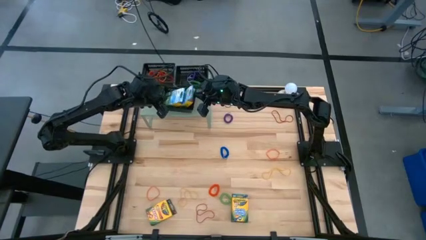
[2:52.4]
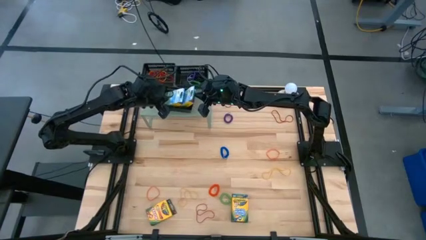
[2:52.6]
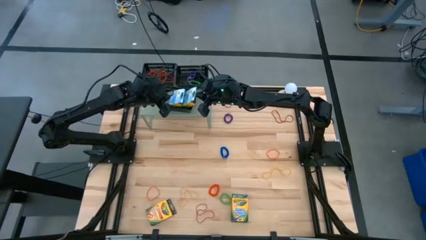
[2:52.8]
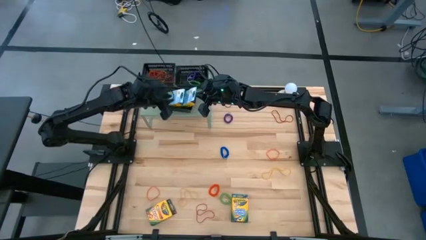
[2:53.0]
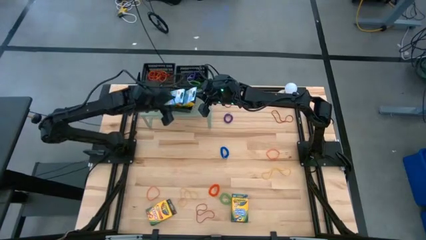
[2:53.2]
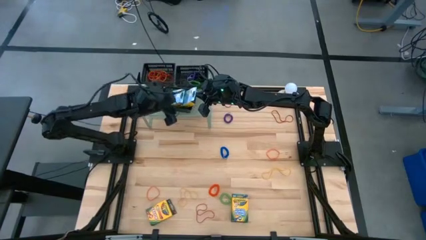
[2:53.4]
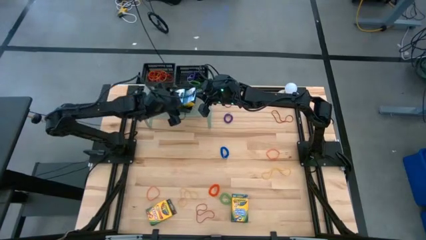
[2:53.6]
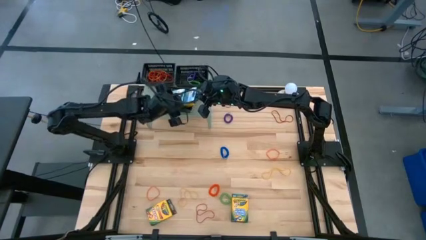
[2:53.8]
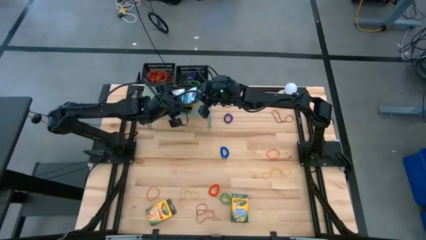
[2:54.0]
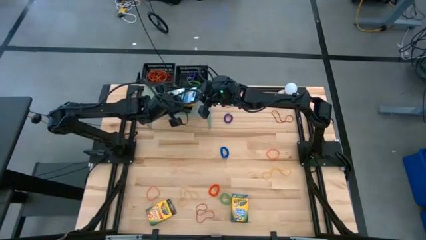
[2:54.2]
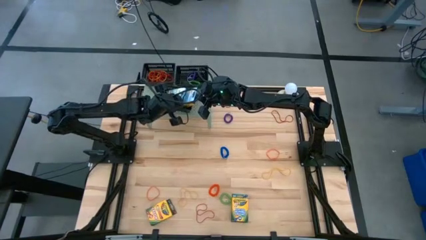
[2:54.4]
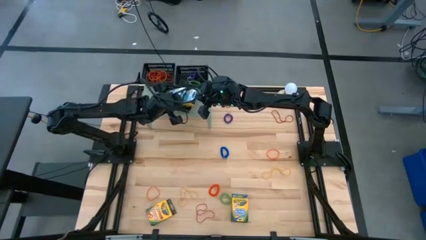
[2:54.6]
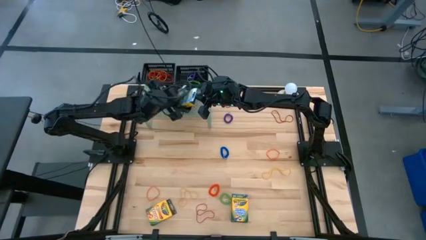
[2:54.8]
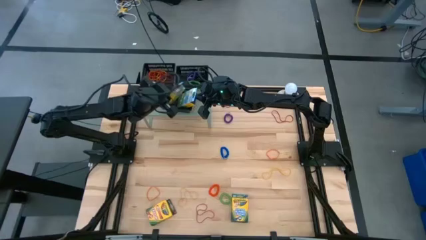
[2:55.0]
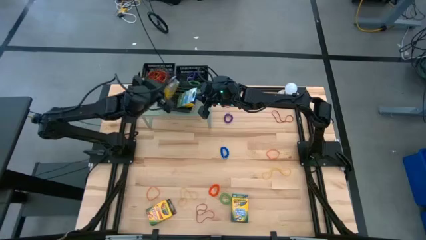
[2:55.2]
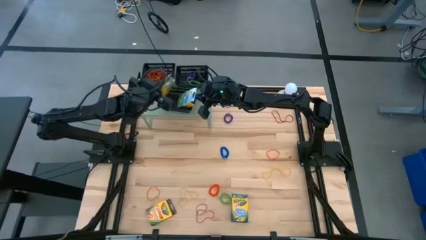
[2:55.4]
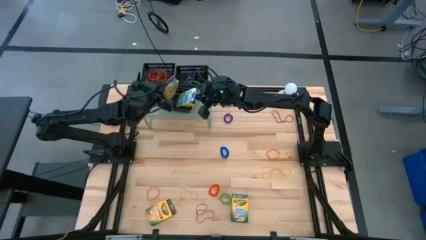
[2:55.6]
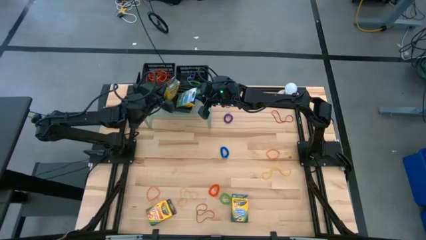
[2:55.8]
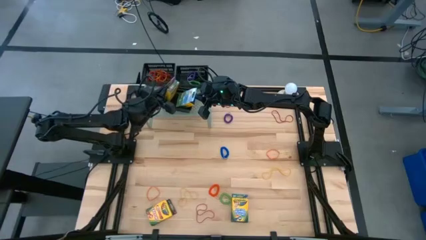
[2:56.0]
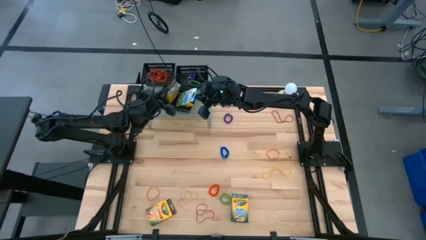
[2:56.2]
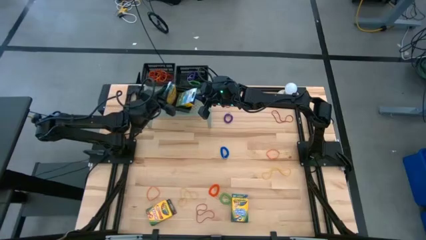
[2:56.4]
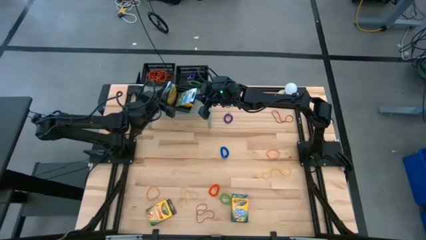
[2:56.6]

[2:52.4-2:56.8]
Task: Pick & Place Office Desk Supplies
Adjust the crayon box on the bottom black bin on the shelf

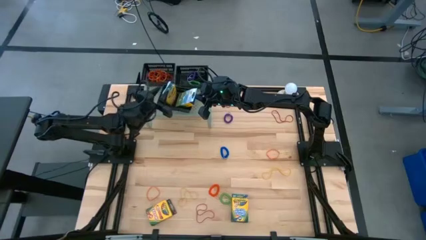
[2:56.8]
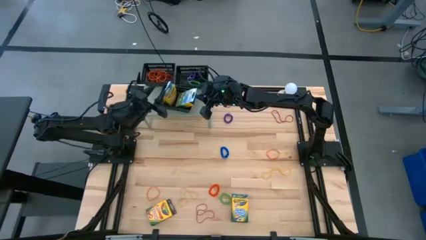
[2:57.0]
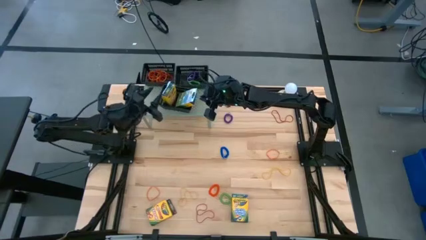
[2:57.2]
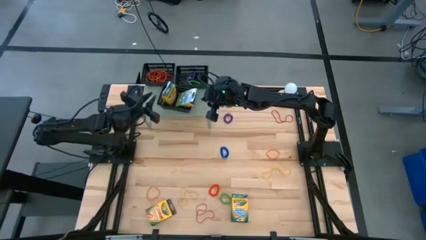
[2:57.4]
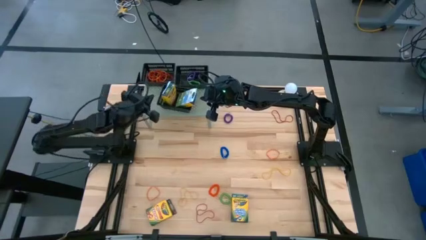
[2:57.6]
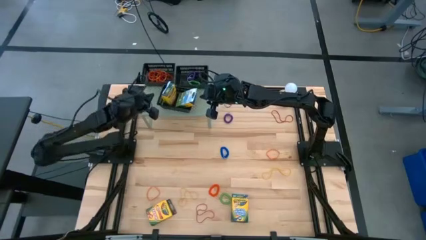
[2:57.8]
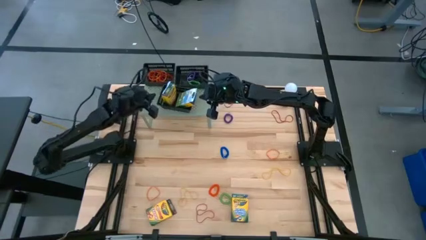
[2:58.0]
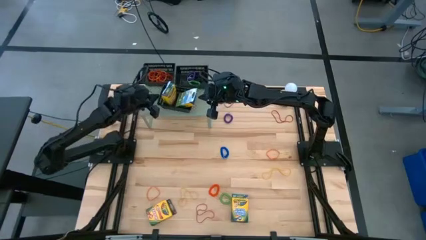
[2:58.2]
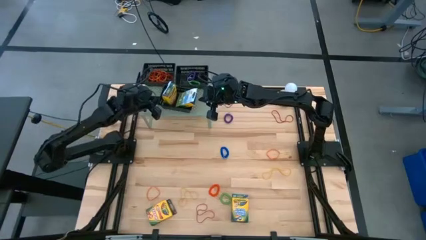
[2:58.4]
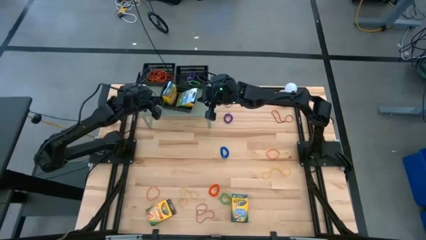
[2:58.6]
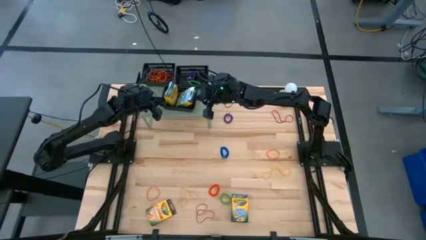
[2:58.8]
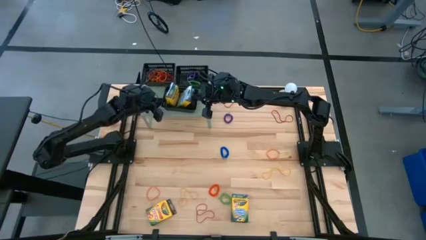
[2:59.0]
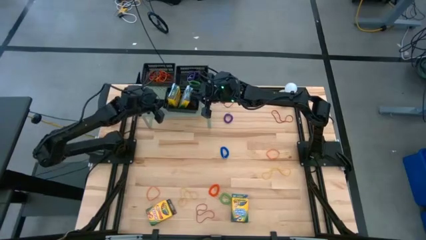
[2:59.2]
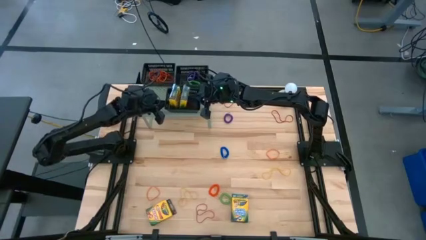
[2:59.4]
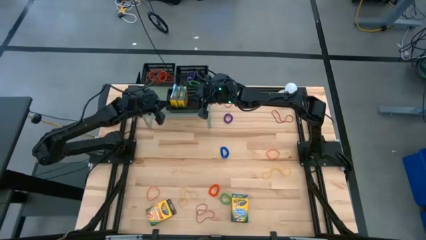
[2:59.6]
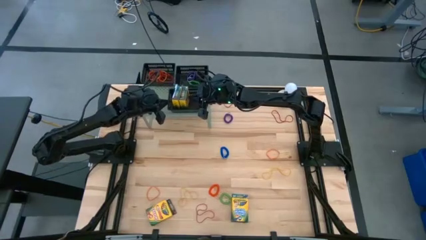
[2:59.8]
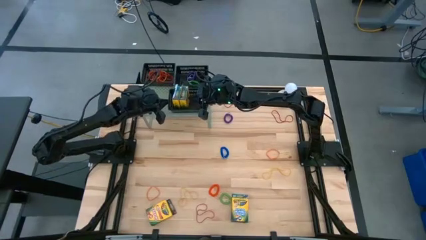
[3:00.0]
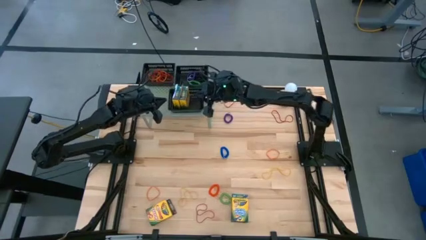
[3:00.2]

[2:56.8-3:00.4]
Adjust the bottom black bin on the shelf

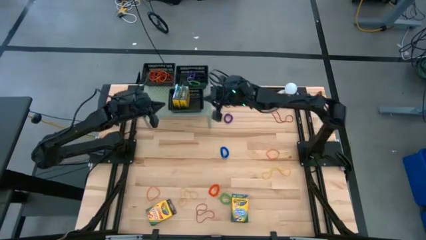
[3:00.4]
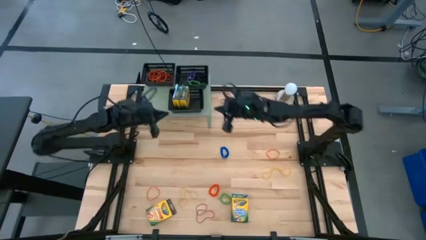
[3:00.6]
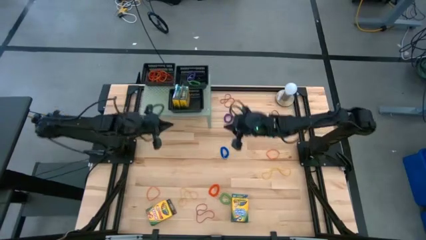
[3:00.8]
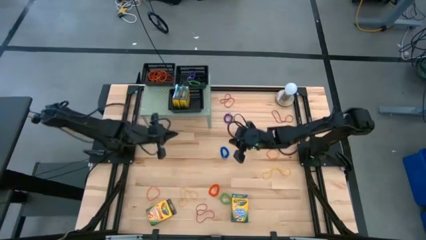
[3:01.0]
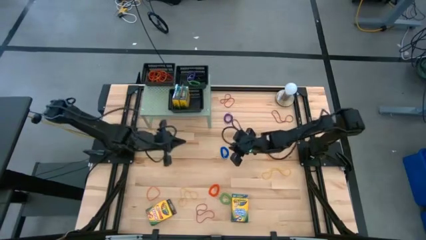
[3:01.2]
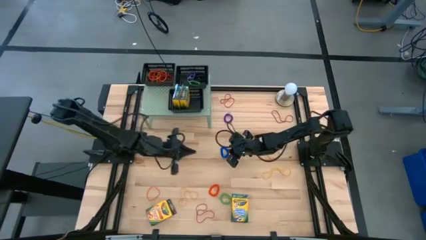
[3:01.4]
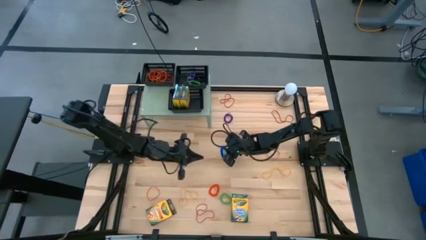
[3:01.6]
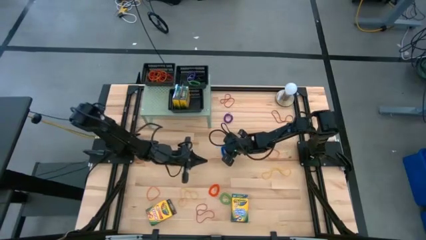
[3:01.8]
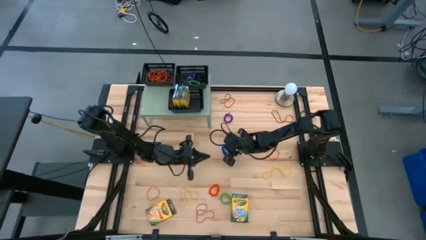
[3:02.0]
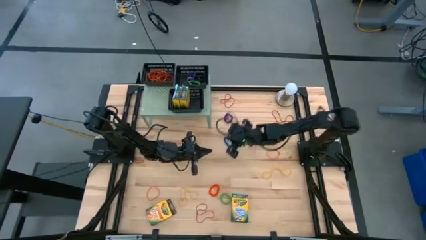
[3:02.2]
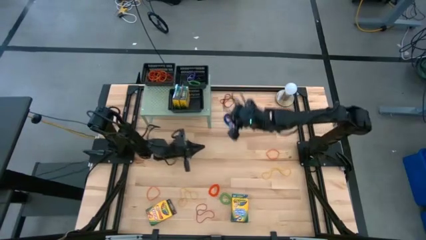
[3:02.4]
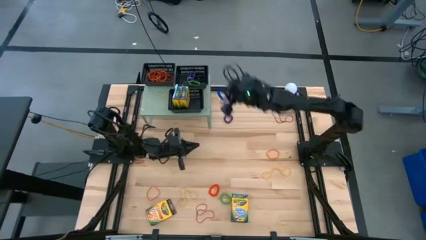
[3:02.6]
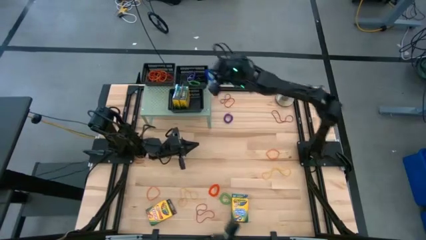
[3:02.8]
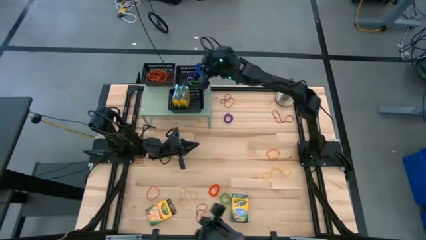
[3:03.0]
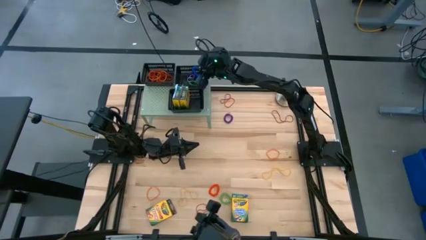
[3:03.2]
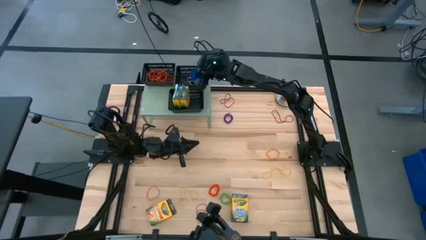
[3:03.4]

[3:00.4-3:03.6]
Put the blue spring keychain into the top right black bin on the shelf

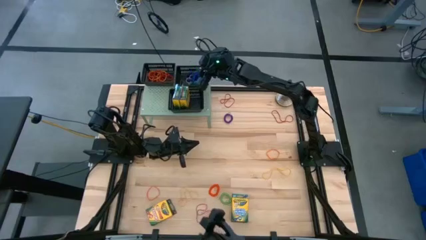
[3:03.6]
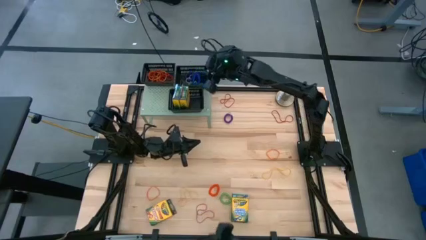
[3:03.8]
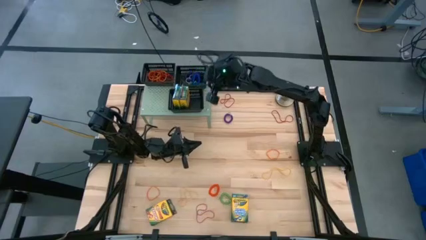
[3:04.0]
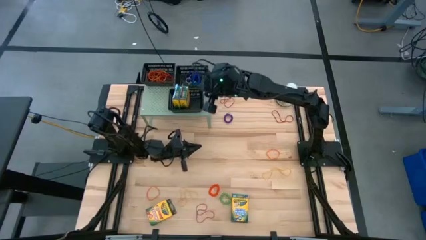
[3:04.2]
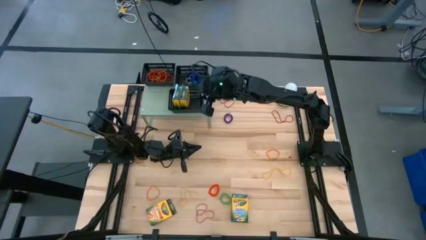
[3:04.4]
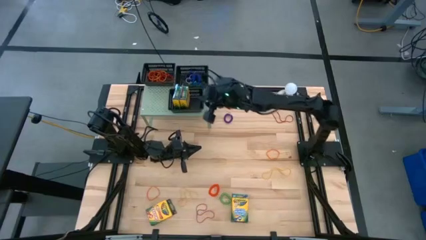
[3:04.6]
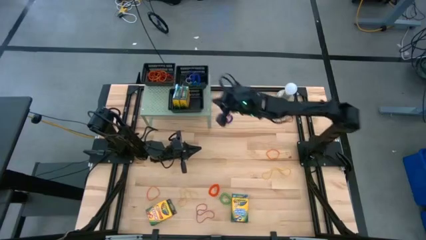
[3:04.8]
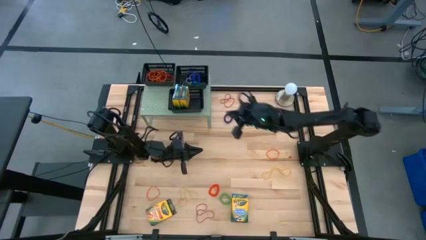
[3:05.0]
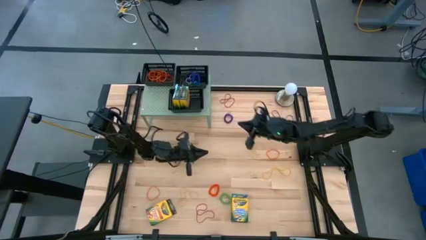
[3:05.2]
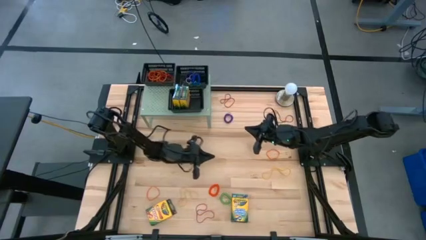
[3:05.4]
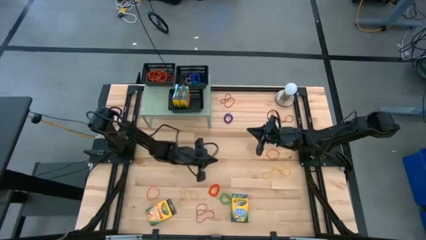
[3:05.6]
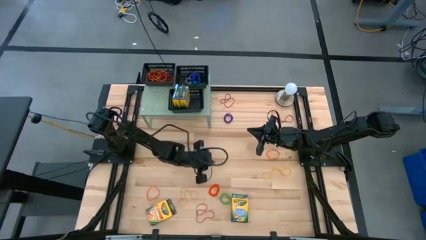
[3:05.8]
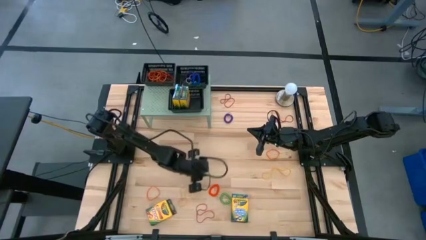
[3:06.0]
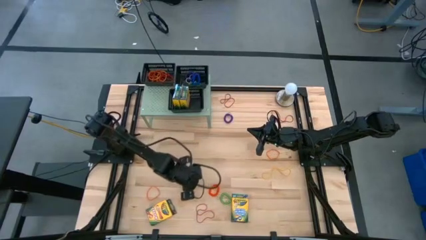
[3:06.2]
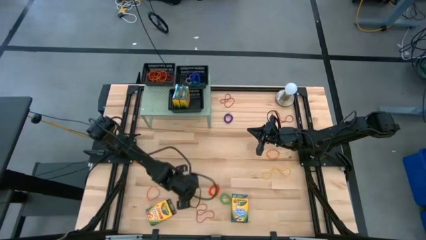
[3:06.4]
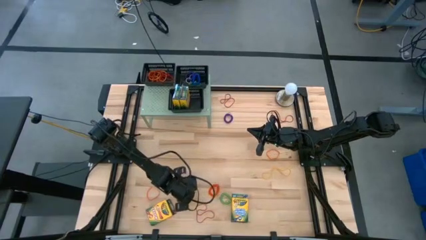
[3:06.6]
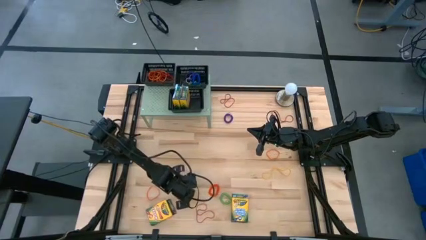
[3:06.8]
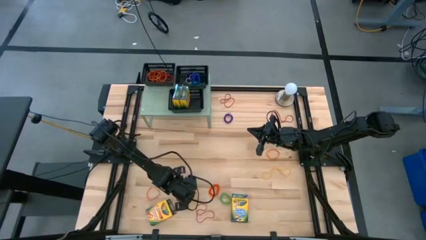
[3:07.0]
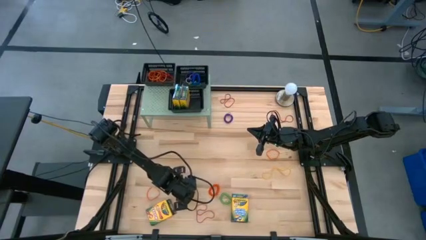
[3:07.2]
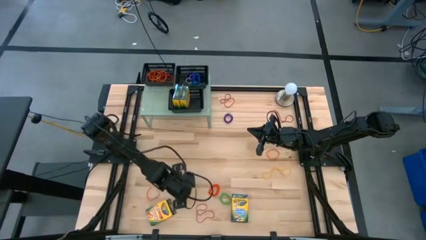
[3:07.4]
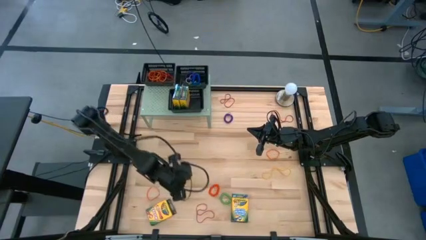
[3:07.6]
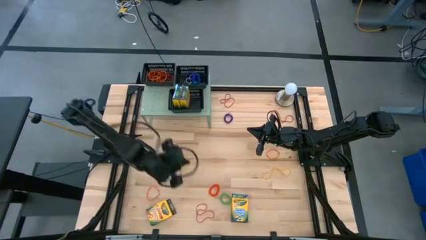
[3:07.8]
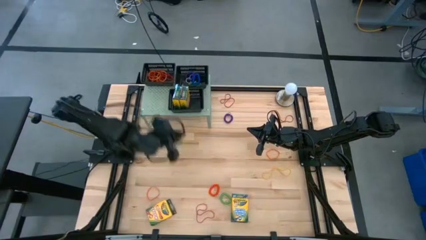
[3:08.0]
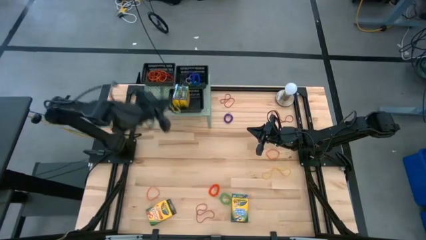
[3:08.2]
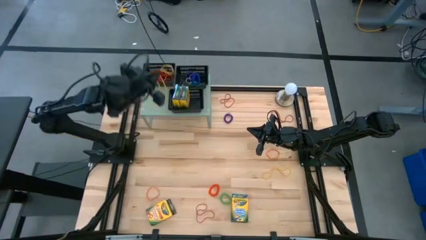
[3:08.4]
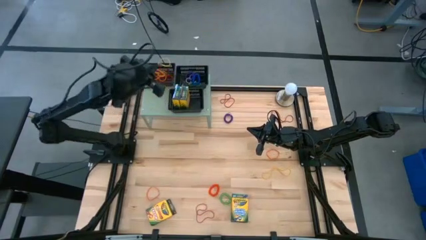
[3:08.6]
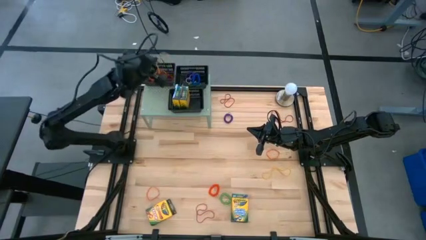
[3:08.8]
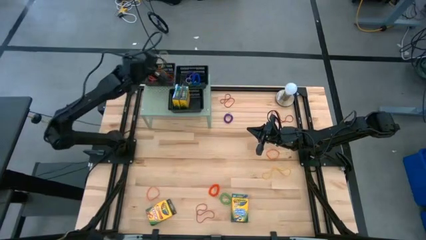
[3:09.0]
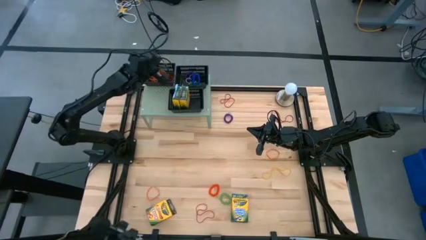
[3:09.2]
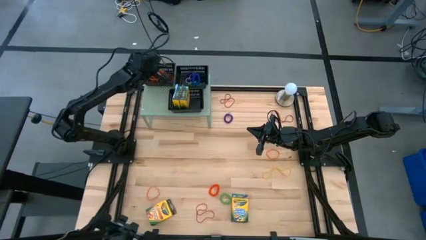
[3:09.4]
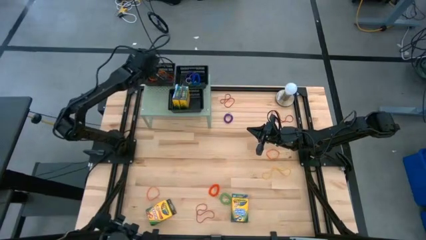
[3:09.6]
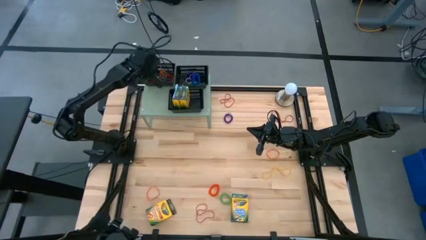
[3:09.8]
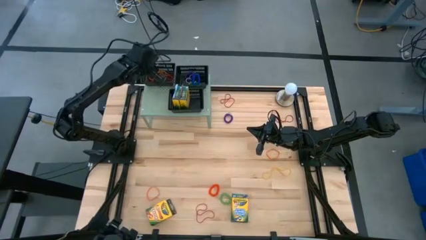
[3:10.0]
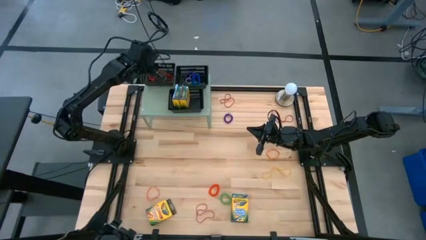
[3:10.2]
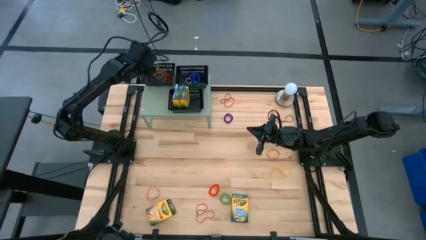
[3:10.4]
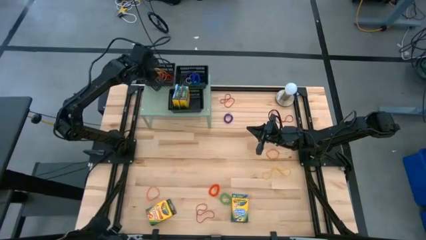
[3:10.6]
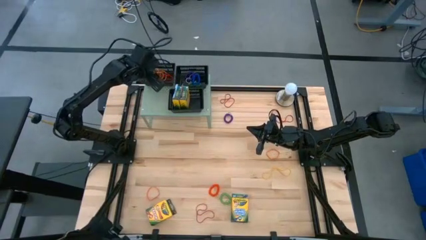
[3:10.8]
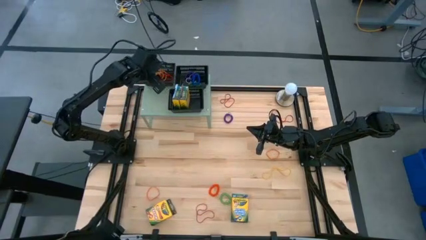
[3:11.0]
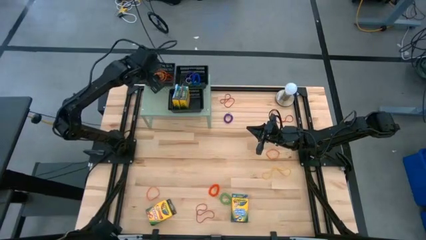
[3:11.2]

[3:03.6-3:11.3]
Put the yellow rubber band into the top left black bin on the shelf
